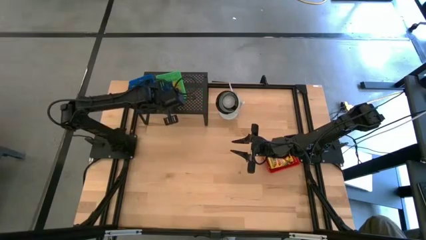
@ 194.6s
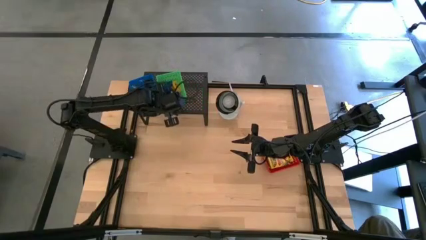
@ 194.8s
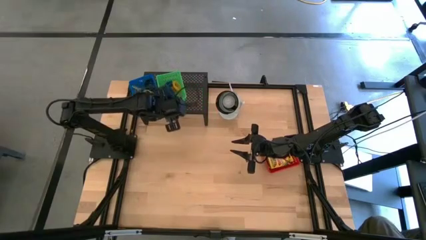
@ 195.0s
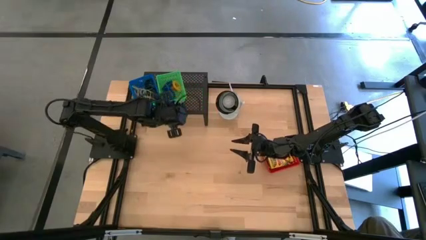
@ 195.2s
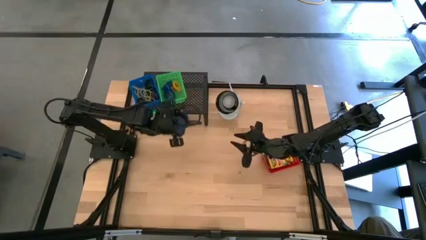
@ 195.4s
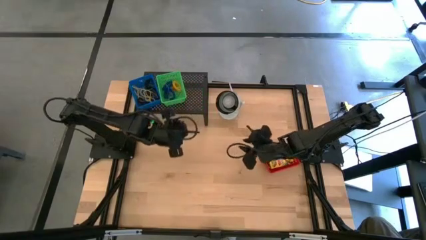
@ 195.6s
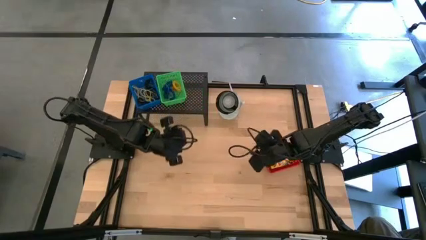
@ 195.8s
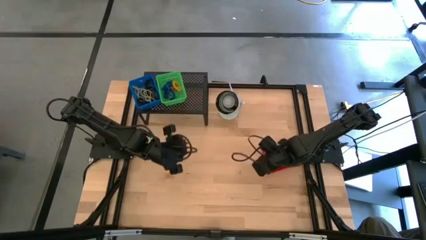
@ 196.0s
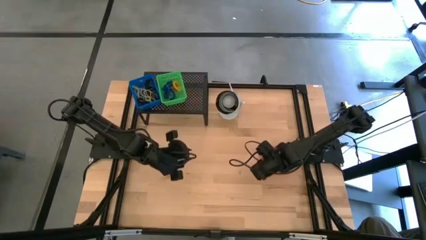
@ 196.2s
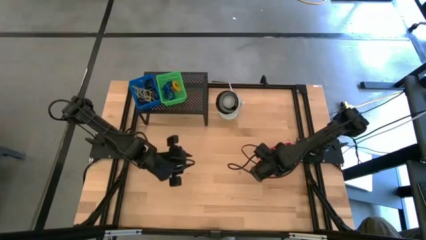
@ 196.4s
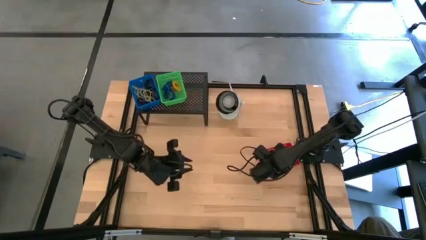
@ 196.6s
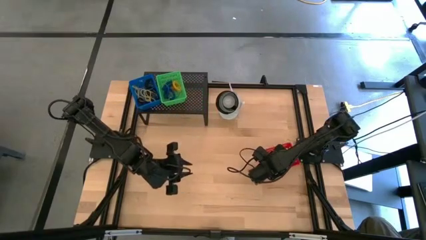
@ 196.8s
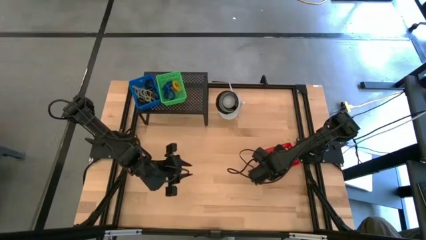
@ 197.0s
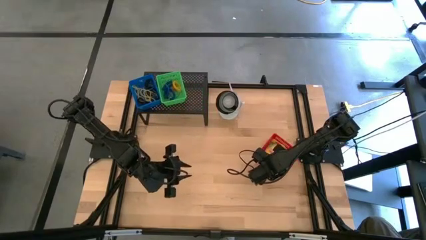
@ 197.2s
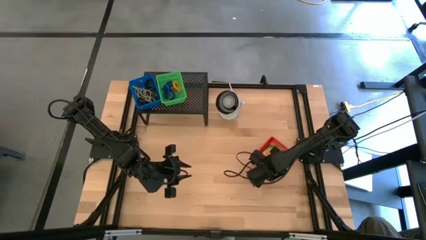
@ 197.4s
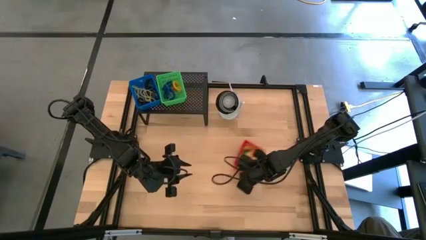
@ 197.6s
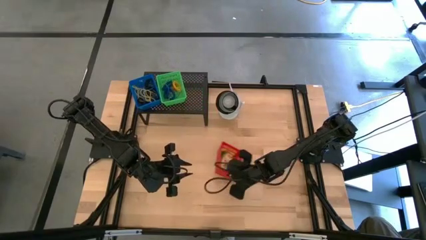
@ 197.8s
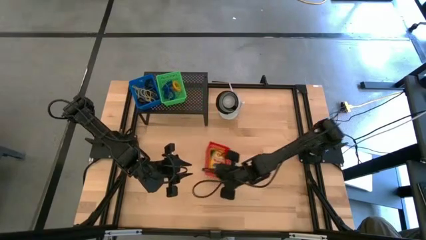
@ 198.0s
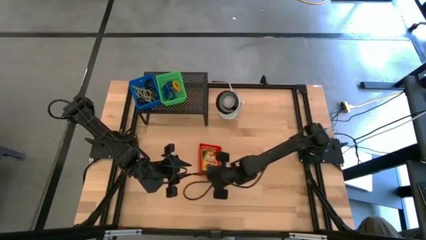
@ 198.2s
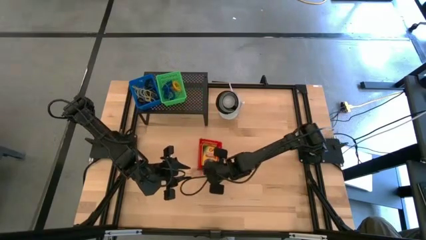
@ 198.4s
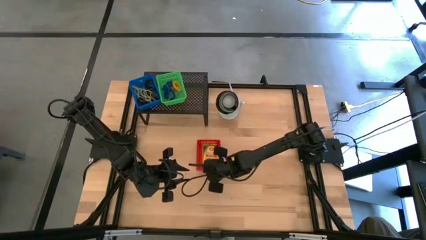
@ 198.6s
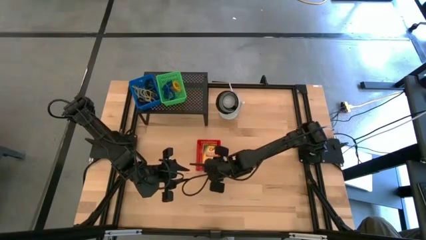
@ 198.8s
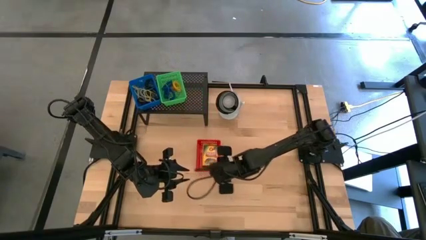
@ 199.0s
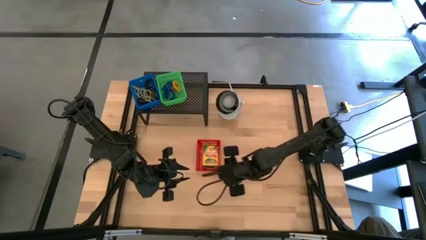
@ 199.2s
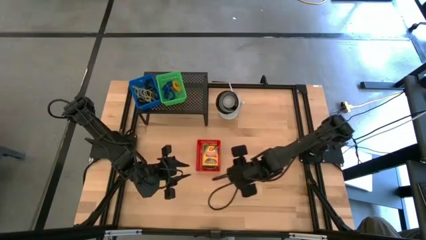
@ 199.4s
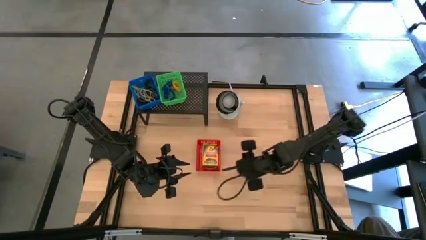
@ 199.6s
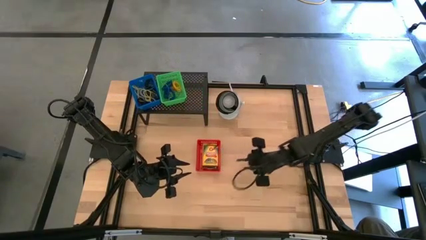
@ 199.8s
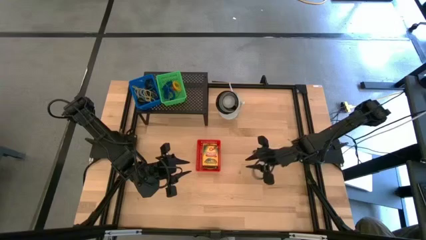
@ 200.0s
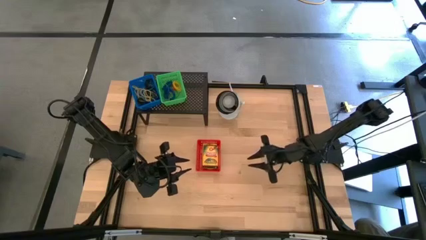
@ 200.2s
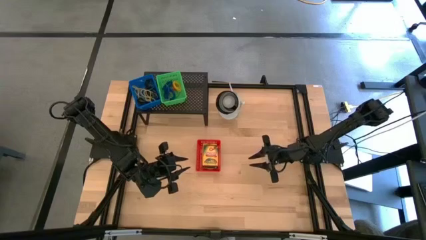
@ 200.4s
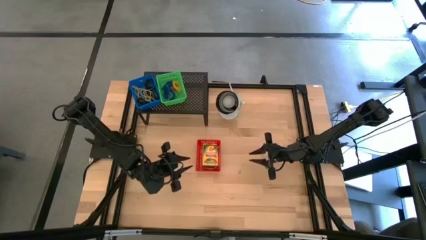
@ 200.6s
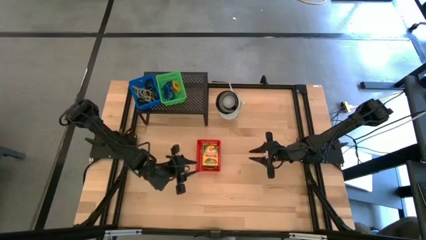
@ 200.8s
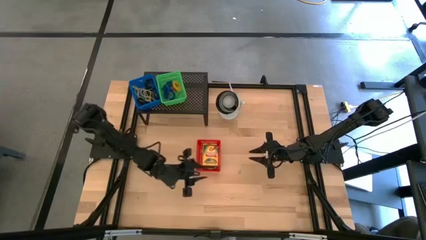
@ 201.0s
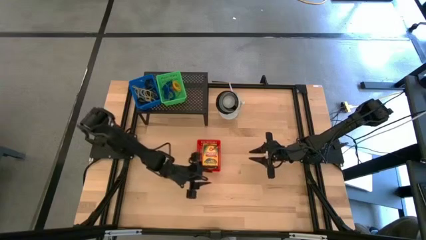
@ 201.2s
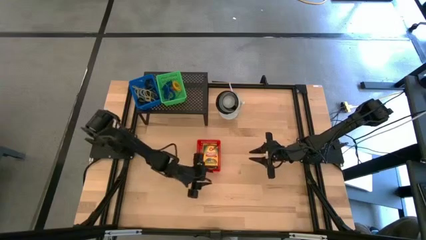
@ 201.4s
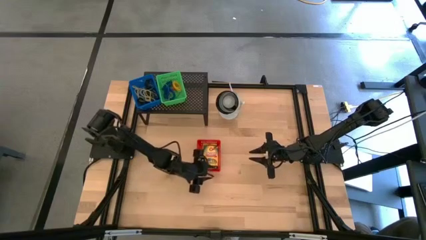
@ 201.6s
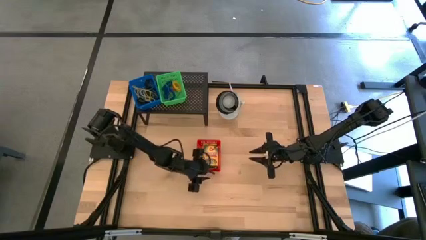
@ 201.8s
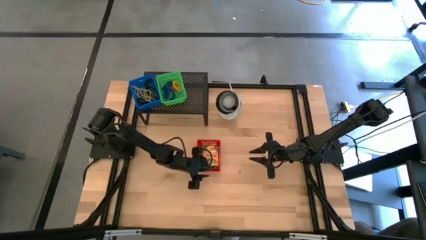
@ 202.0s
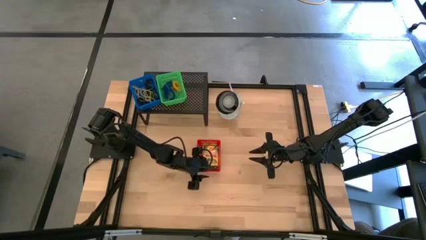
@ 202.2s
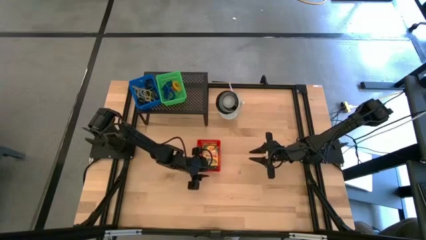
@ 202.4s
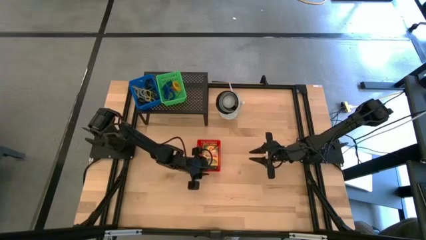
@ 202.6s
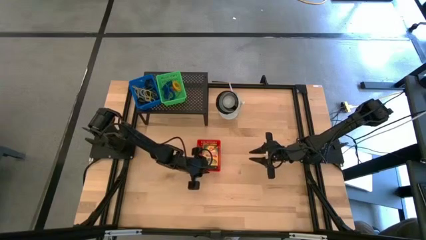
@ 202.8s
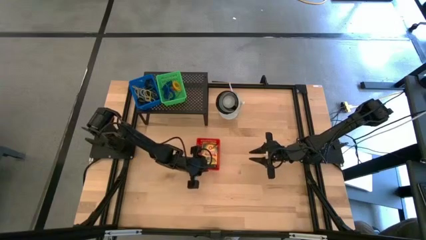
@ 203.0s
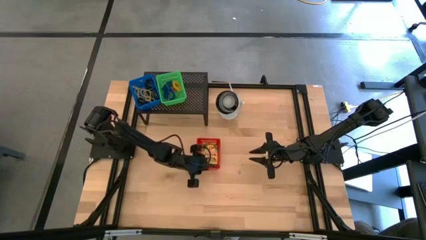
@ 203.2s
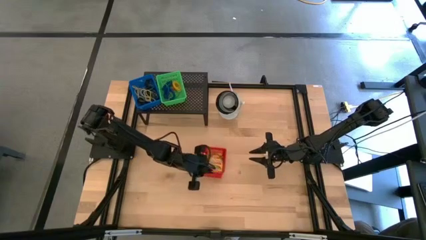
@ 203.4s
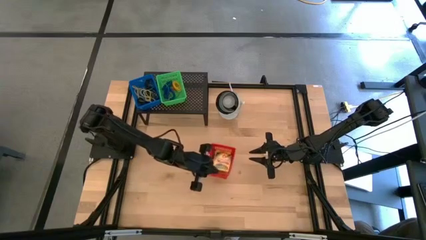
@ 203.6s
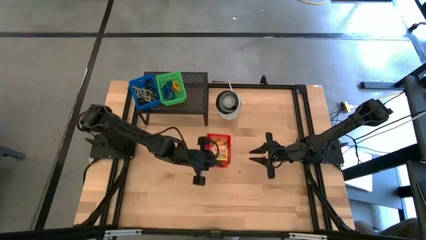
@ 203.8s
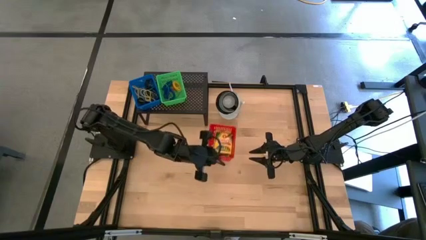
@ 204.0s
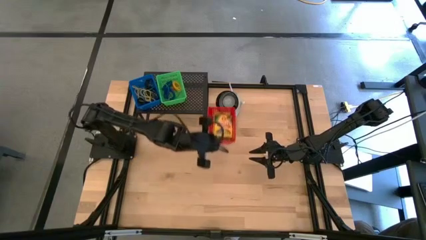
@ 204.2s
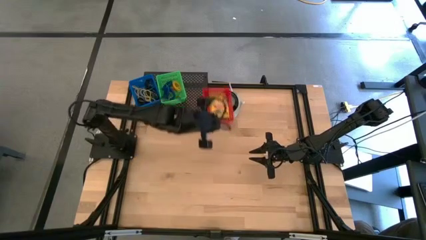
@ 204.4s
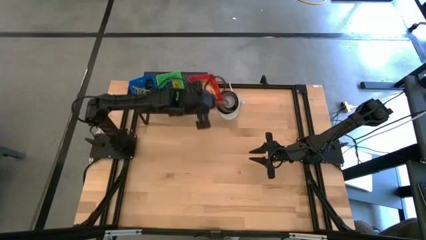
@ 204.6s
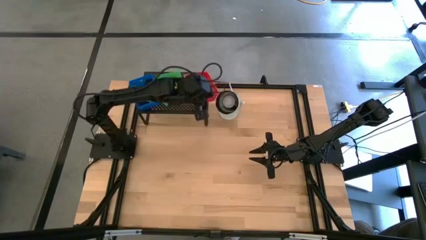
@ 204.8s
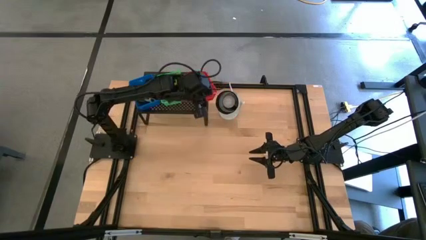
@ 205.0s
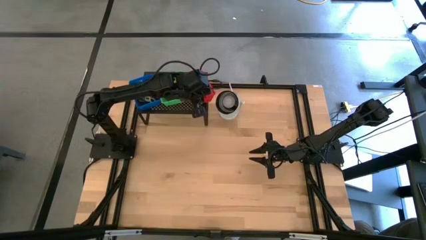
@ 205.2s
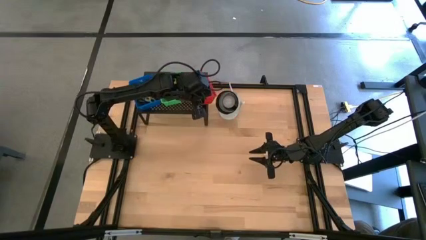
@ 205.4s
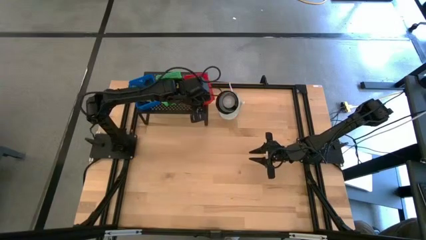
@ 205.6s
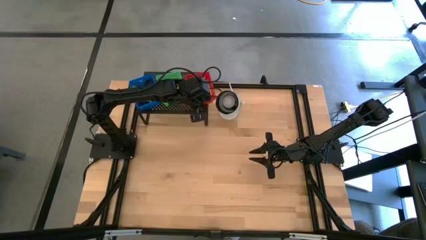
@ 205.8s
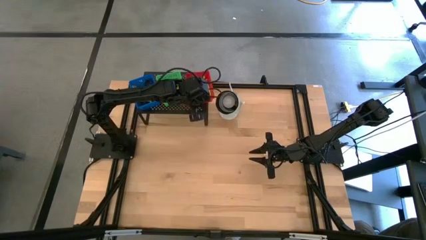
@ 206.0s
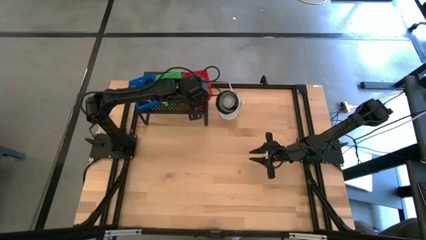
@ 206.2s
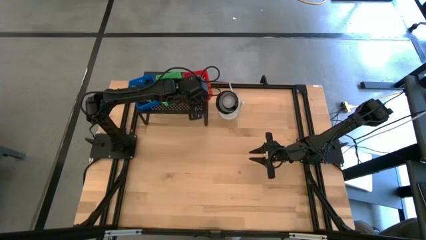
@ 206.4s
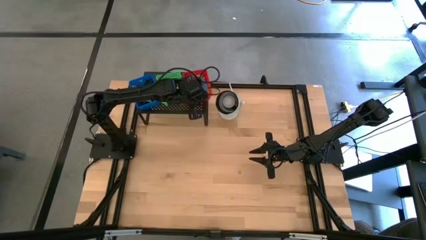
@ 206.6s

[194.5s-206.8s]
Task: Pick & Place Office Desk Supplies
Put the red bin on the shelf
